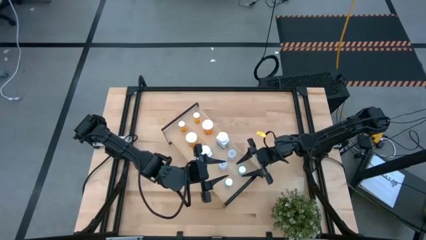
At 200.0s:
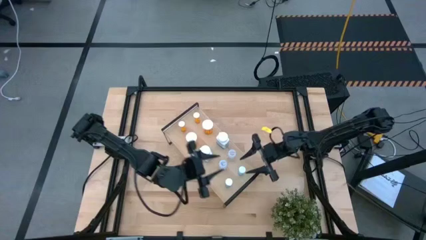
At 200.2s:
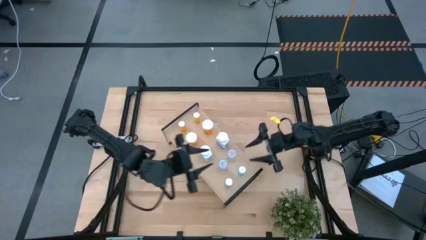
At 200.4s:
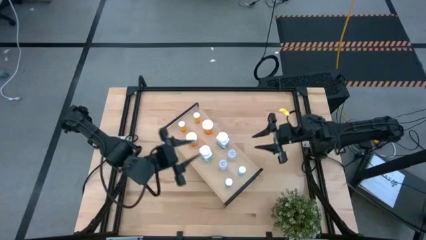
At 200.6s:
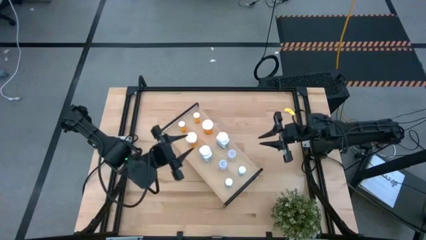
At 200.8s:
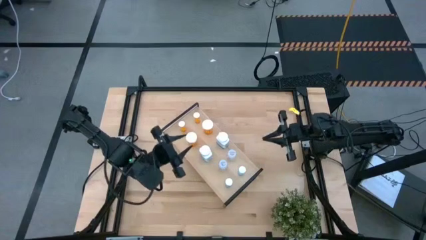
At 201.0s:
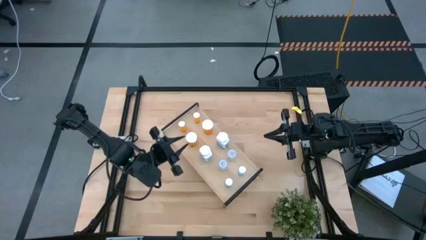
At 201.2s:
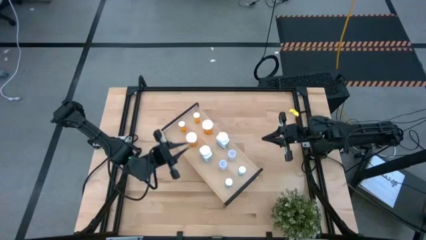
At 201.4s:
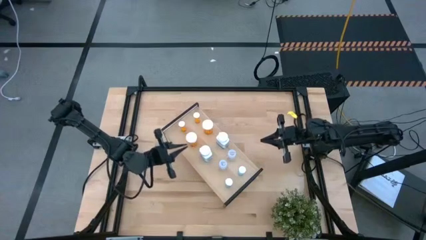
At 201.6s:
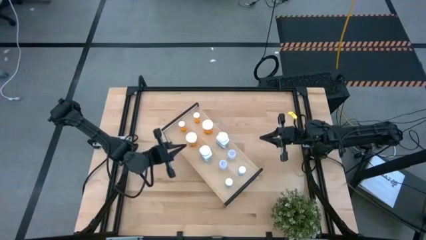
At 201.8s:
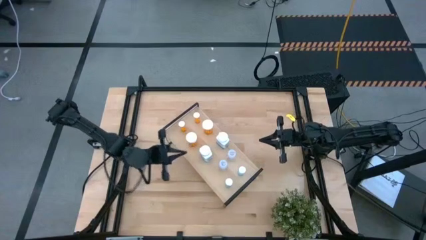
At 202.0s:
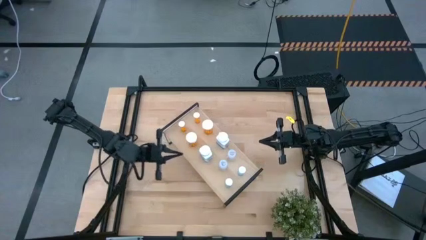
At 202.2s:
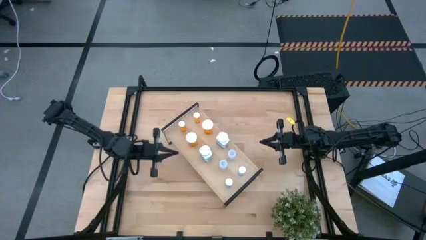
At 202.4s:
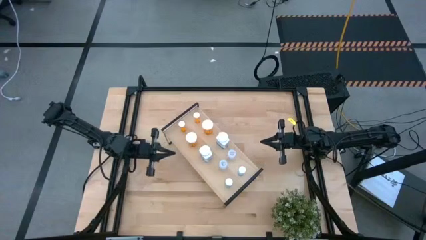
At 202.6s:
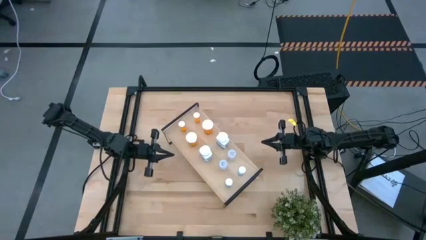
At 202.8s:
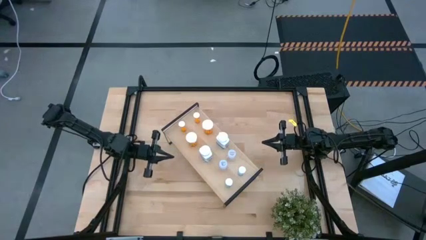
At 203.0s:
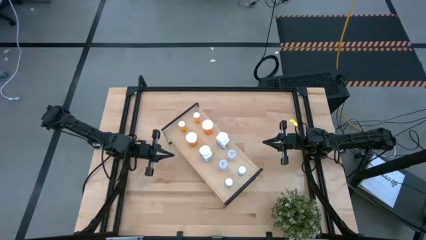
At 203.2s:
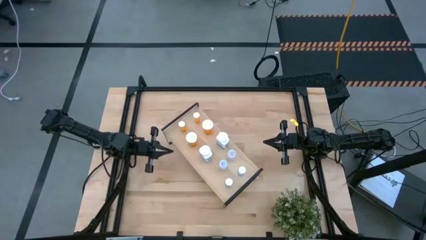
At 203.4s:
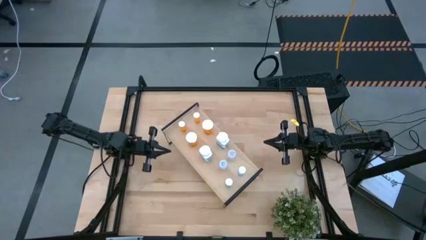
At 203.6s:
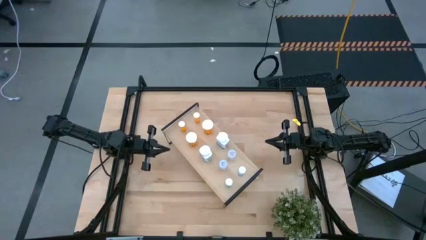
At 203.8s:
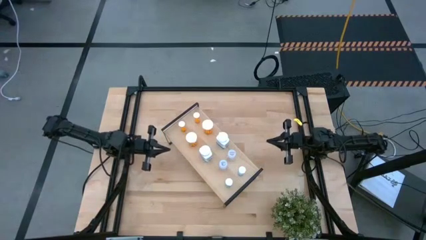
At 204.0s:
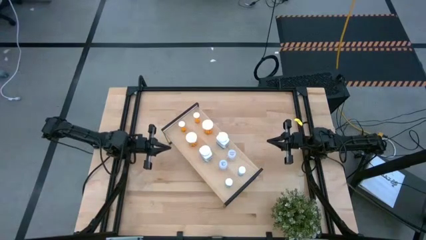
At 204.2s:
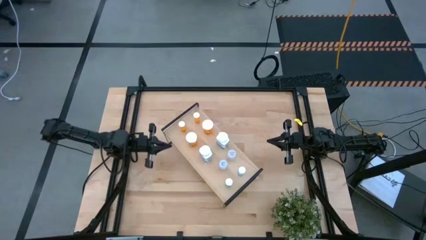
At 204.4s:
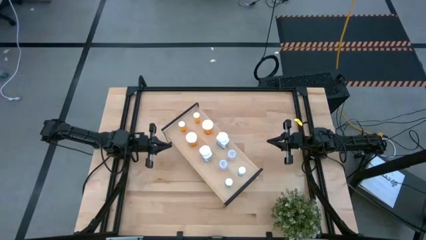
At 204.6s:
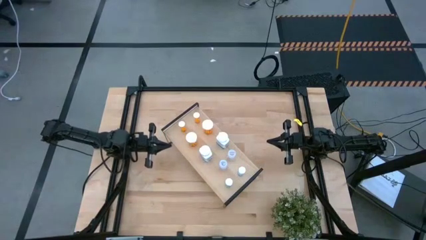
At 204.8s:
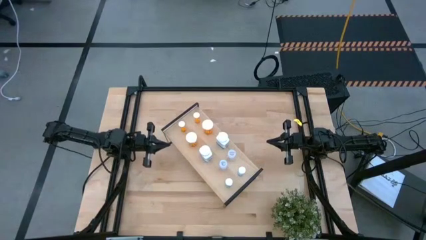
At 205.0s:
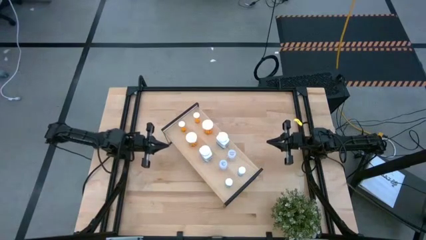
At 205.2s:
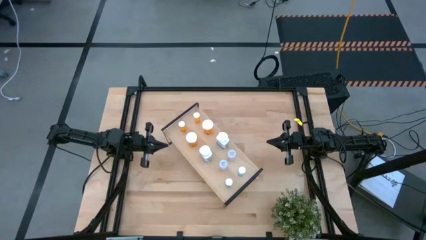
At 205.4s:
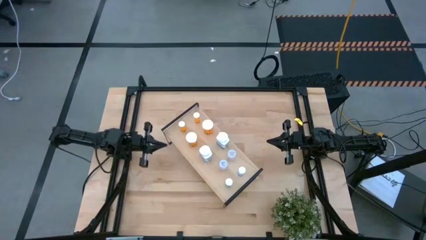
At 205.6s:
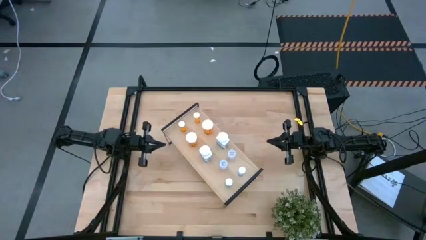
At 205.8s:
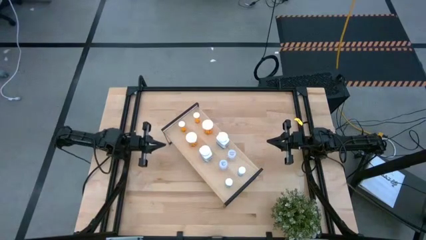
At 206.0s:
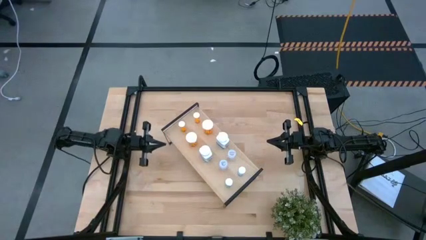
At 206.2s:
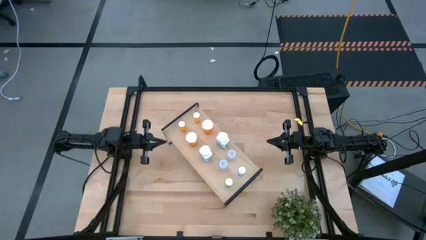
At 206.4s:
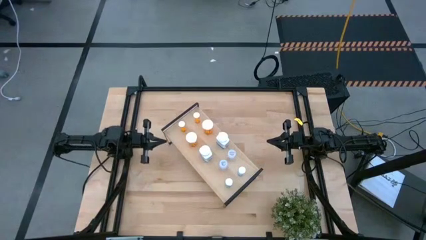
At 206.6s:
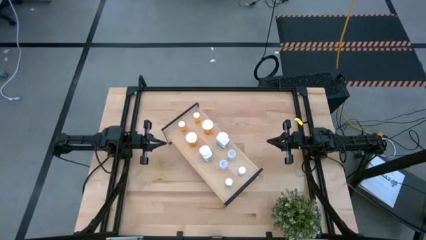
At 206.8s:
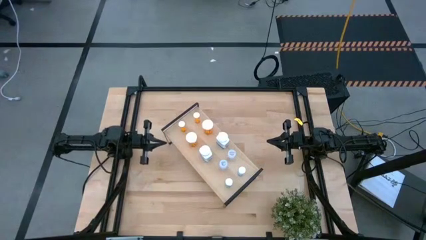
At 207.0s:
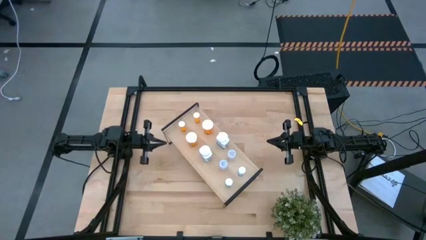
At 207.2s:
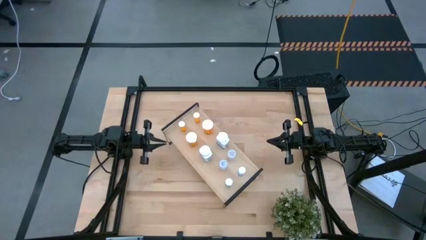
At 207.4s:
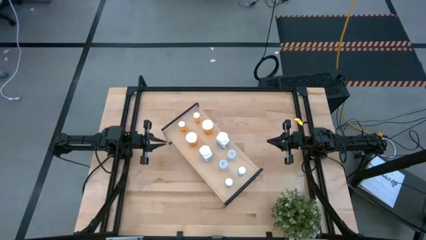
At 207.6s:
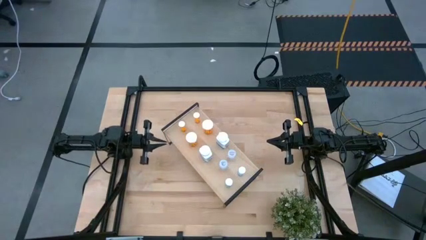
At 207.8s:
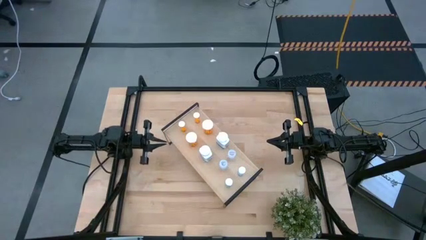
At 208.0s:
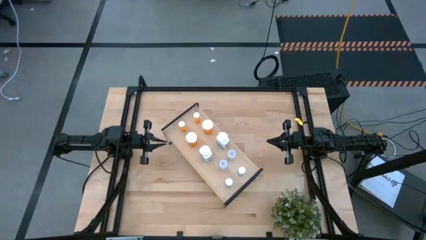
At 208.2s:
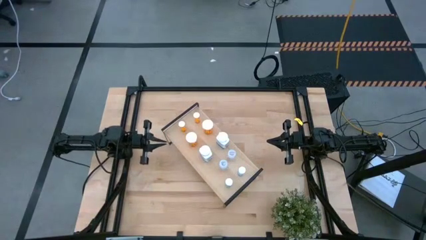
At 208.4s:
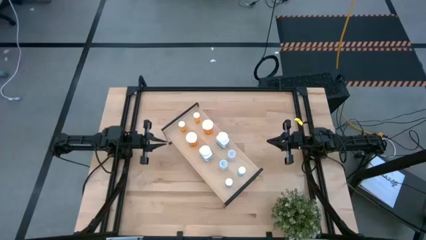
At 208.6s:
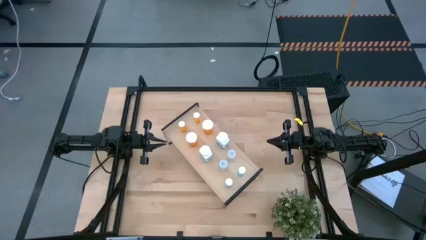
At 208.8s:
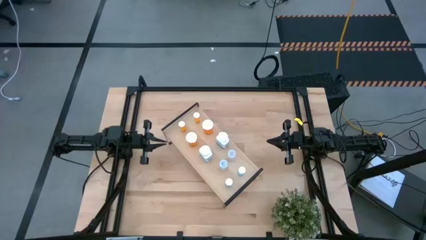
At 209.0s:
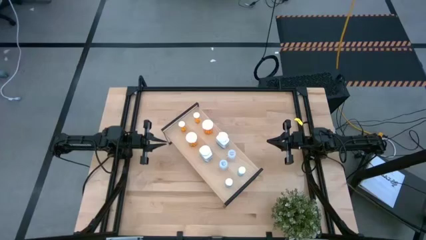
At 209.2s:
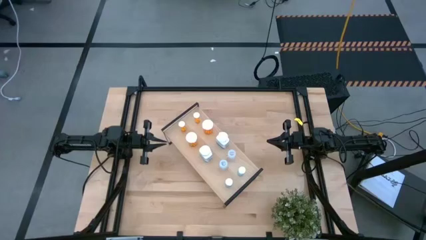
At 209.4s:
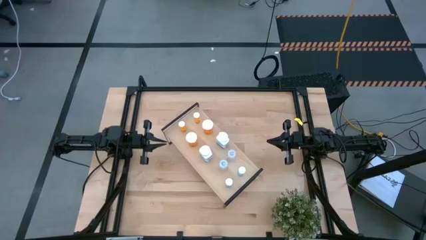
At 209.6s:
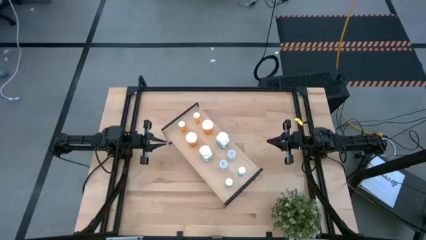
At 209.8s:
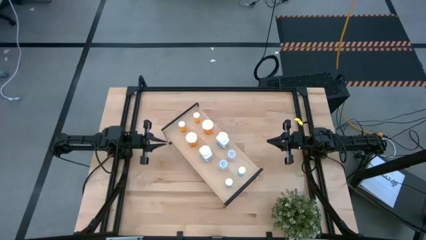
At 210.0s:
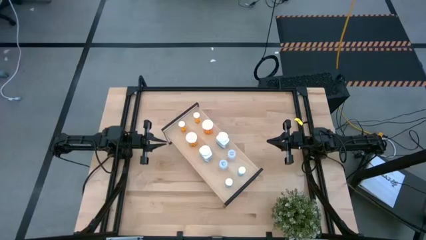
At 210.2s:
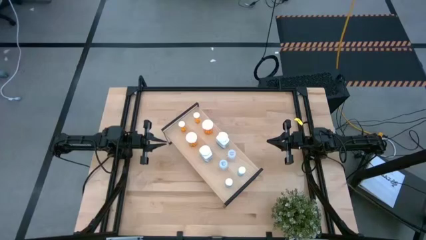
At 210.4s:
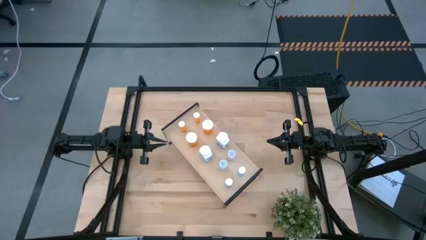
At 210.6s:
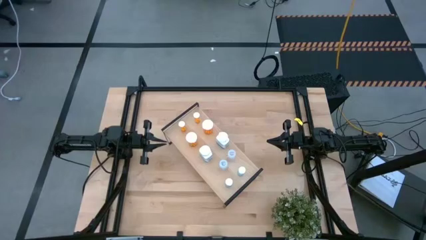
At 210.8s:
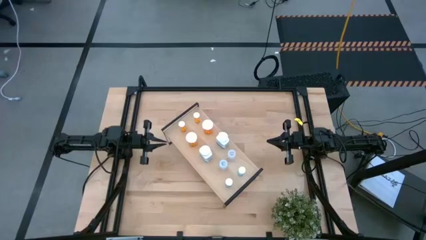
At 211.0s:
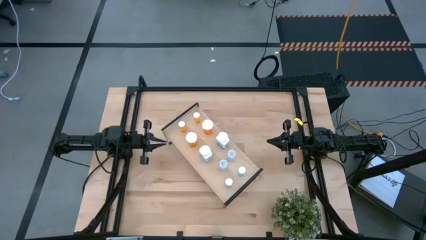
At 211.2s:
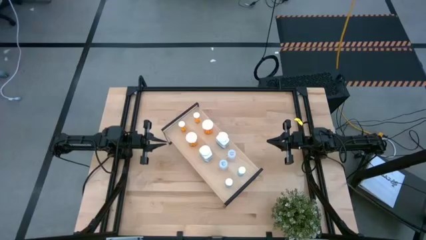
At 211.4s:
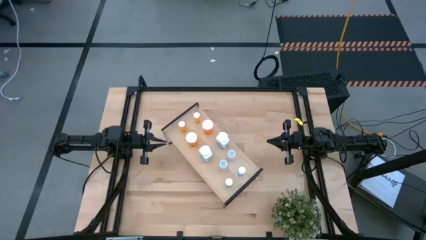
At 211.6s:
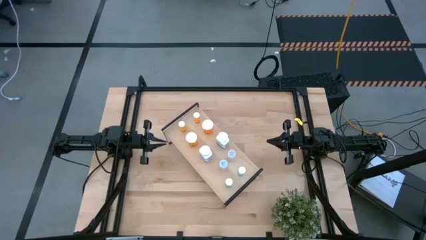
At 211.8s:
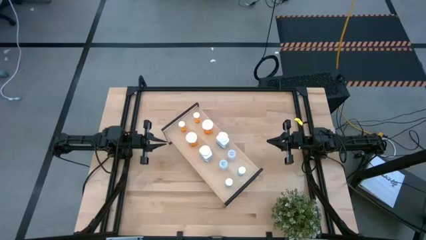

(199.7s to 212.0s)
Task: Pick and place medicine bottles onto shelf by color
Return to Home Position

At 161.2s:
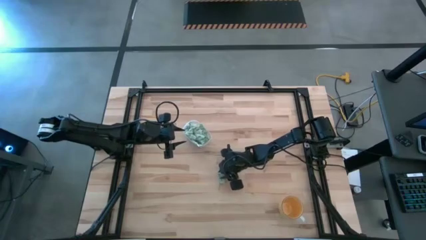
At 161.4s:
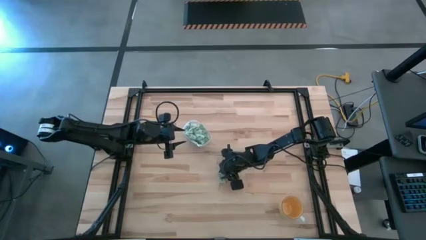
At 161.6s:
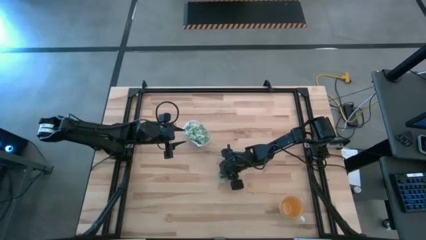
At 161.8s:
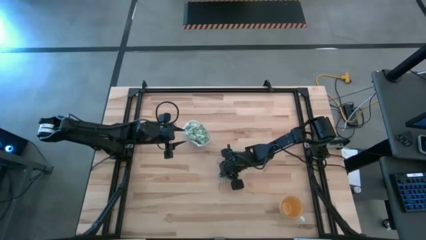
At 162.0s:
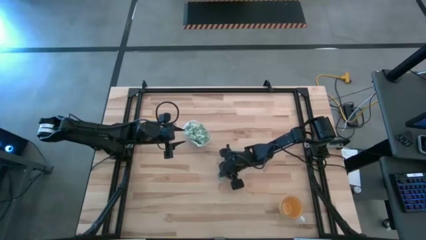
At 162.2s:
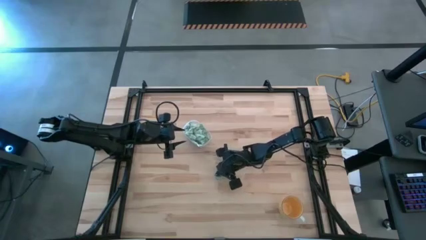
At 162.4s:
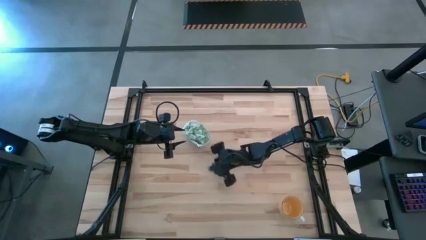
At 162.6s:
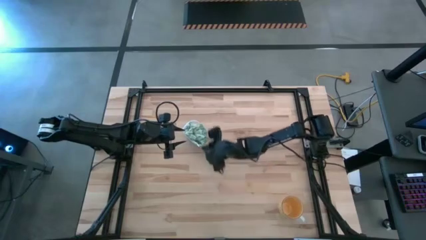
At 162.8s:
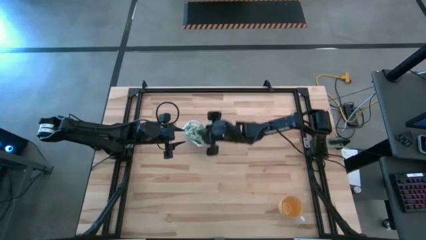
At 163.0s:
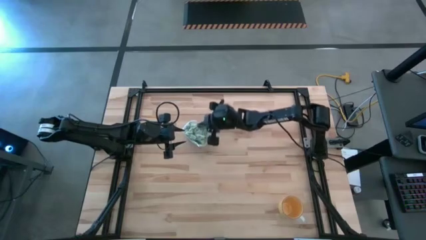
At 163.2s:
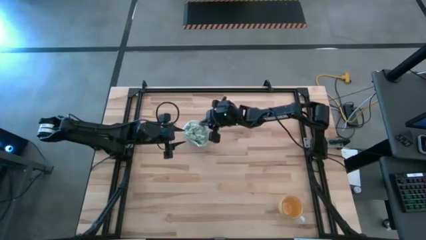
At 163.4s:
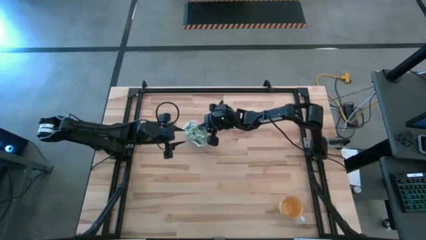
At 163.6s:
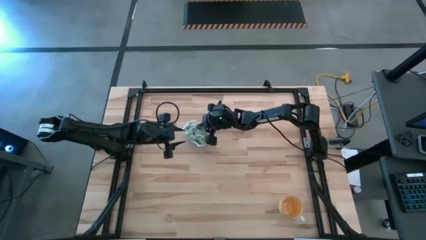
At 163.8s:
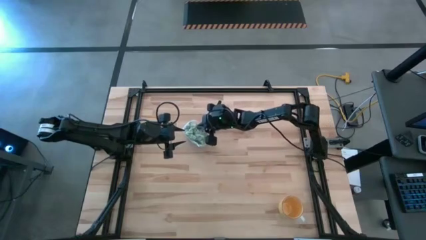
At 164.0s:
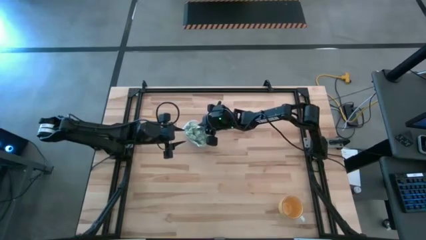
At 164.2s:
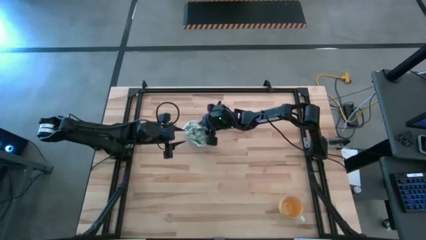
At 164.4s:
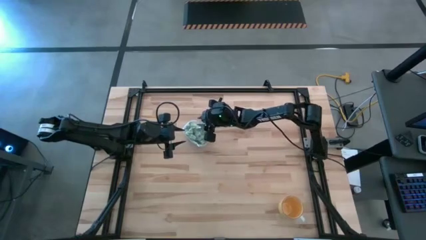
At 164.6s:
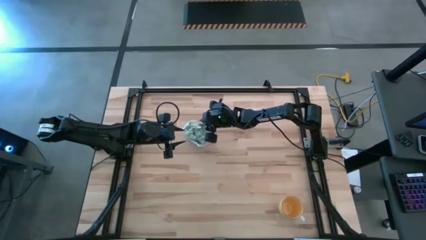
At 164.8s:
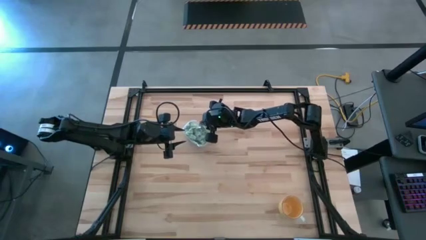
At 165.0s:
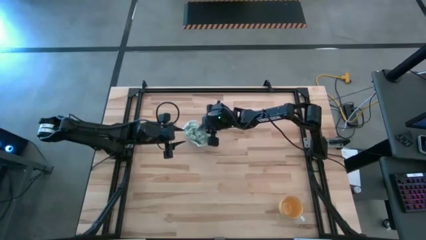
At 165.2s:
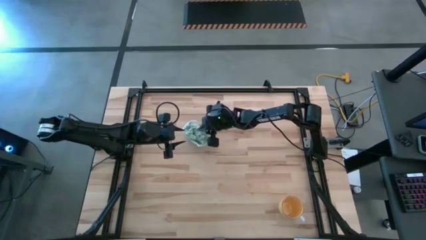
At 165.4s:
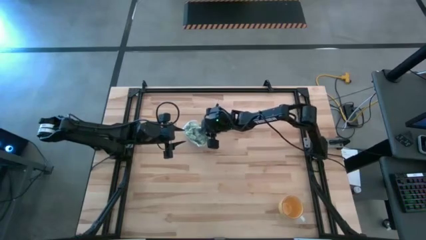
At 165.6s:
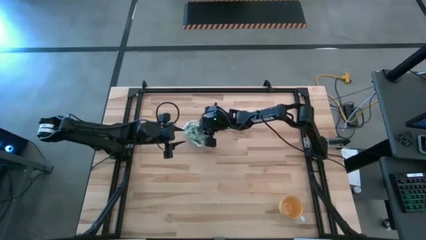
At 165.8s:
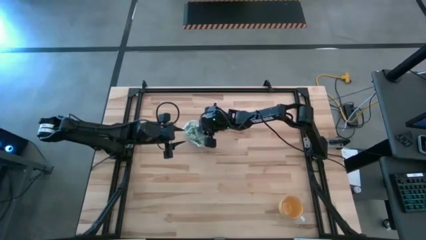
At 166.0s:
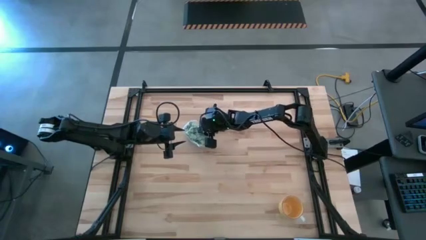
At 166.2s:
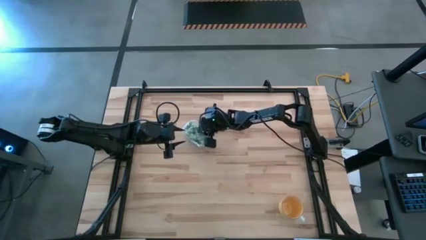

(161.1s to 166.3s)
Task: Pick and place Stevia / Truvia into bins
Put the stevia packet into the transparent bin
